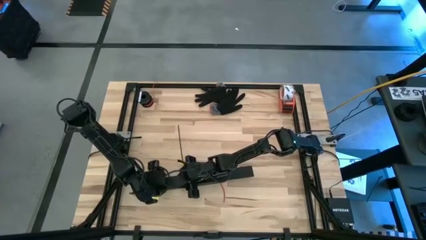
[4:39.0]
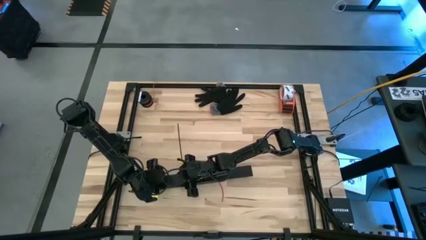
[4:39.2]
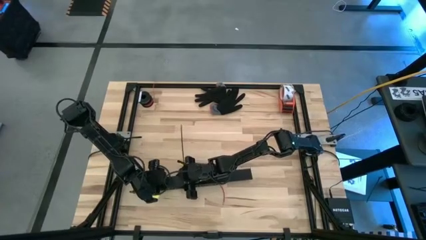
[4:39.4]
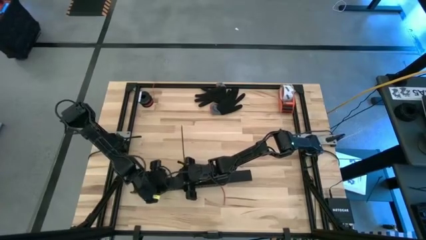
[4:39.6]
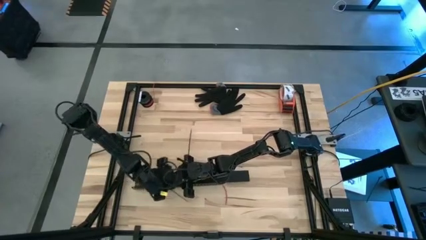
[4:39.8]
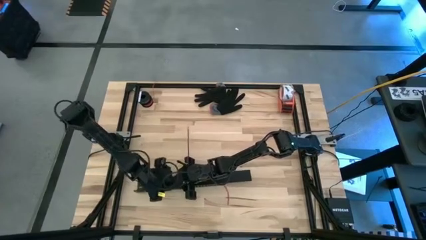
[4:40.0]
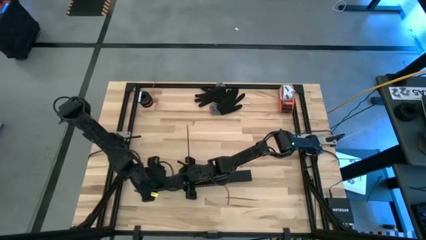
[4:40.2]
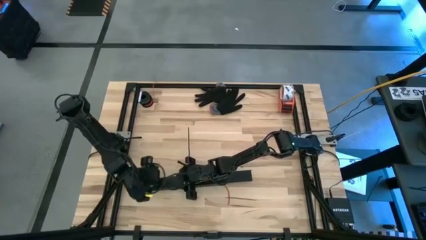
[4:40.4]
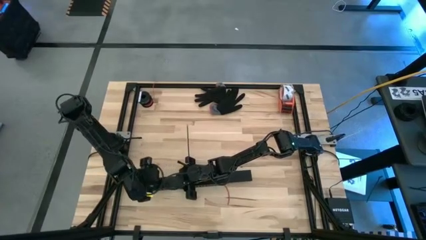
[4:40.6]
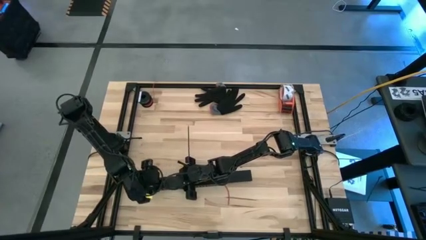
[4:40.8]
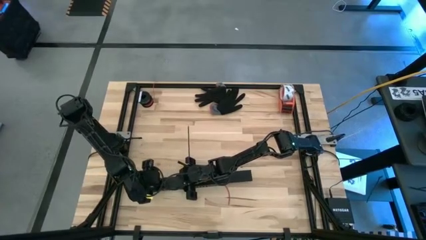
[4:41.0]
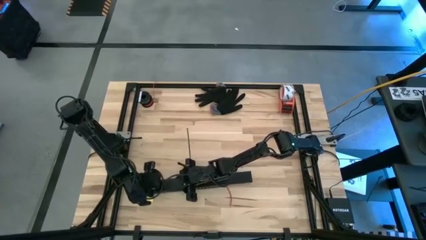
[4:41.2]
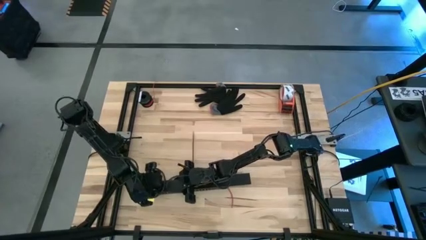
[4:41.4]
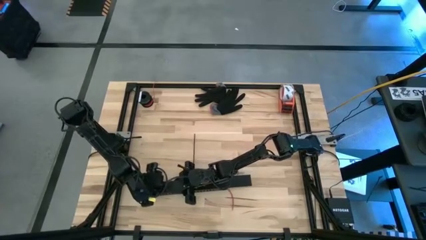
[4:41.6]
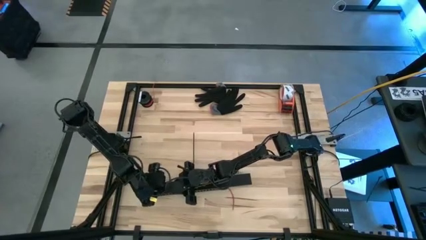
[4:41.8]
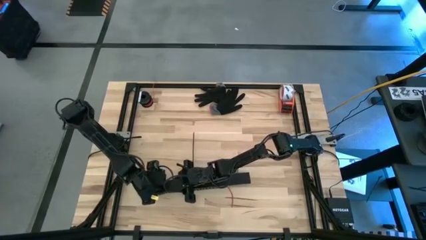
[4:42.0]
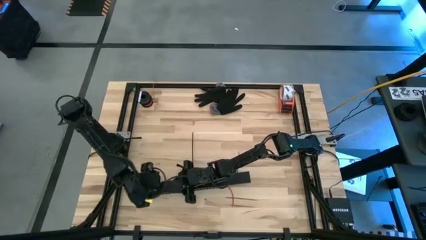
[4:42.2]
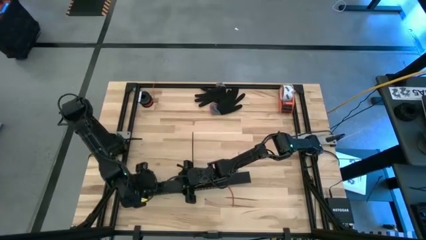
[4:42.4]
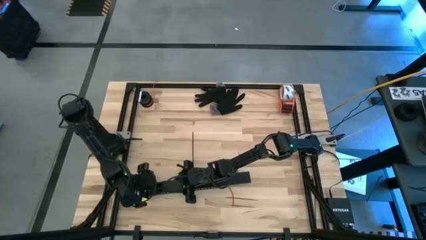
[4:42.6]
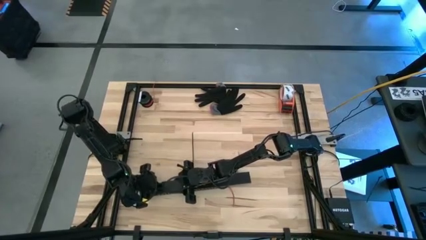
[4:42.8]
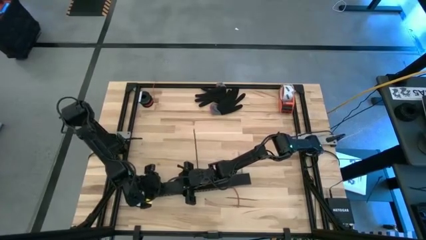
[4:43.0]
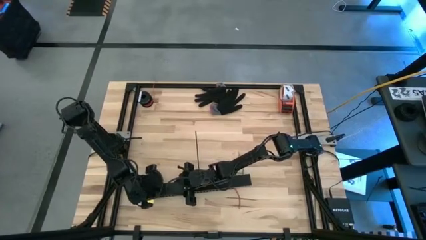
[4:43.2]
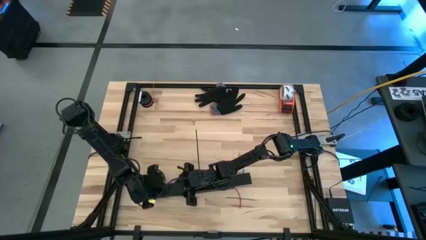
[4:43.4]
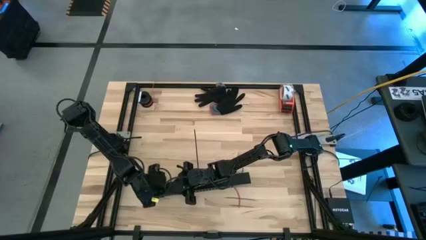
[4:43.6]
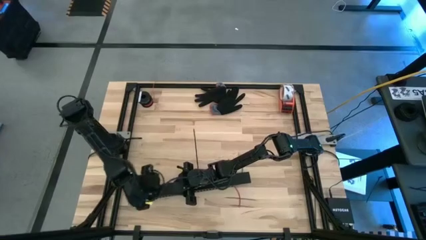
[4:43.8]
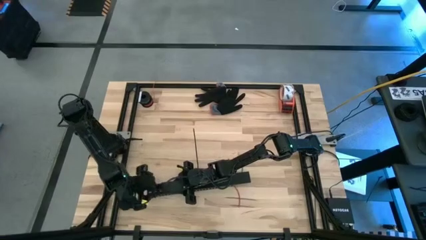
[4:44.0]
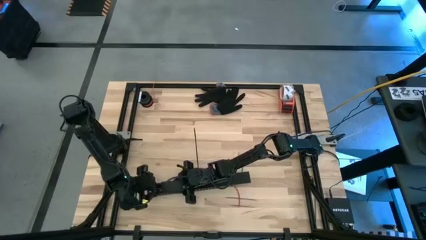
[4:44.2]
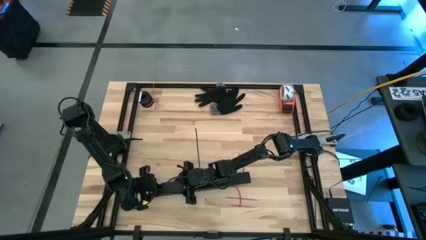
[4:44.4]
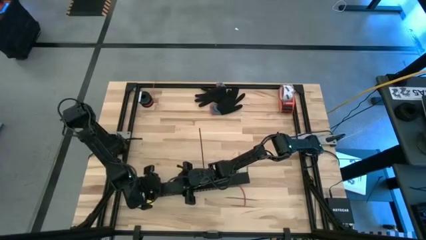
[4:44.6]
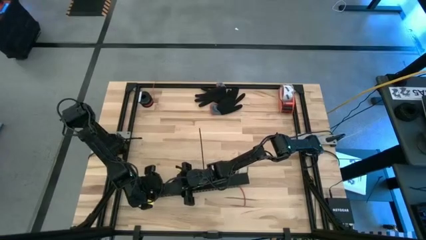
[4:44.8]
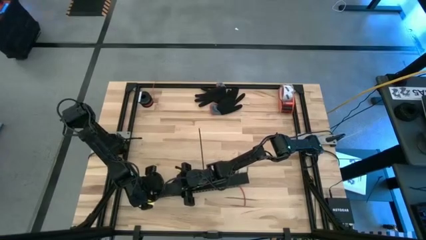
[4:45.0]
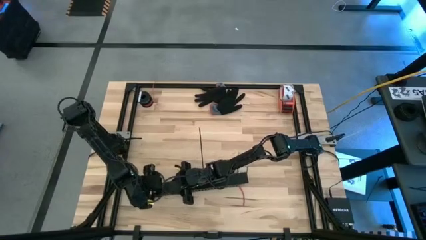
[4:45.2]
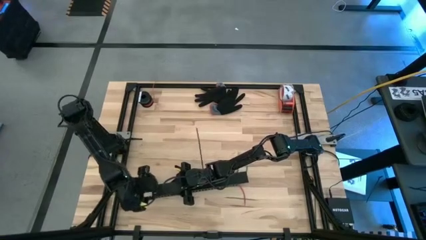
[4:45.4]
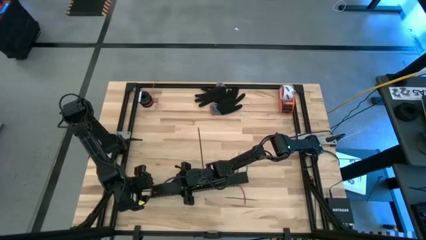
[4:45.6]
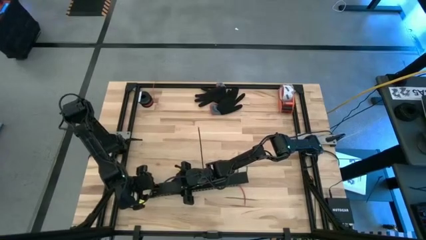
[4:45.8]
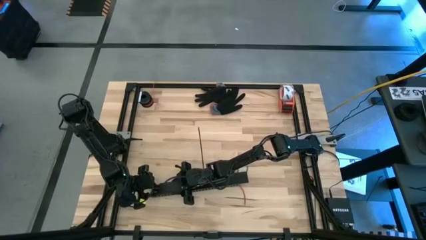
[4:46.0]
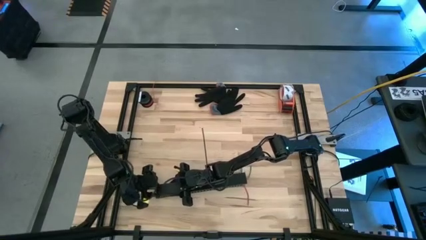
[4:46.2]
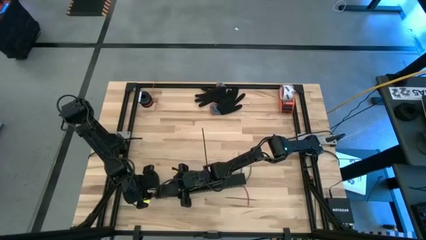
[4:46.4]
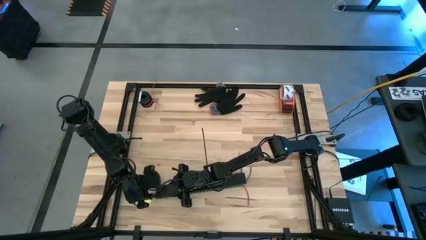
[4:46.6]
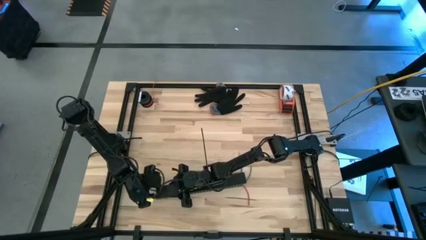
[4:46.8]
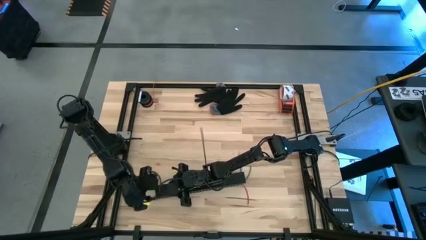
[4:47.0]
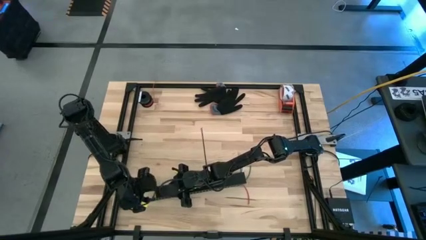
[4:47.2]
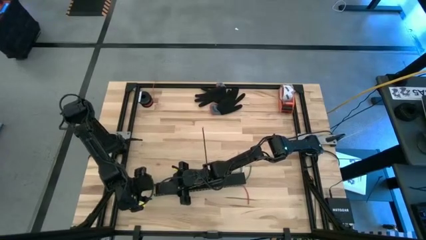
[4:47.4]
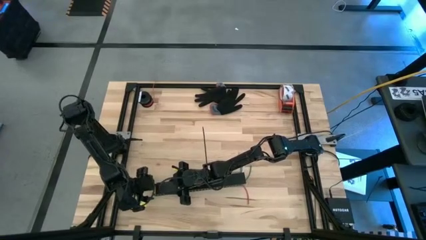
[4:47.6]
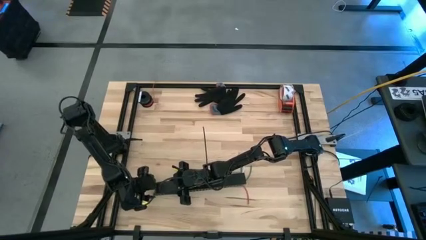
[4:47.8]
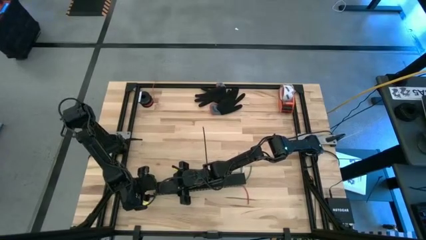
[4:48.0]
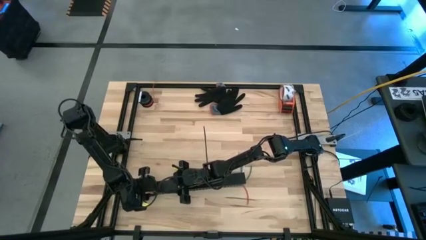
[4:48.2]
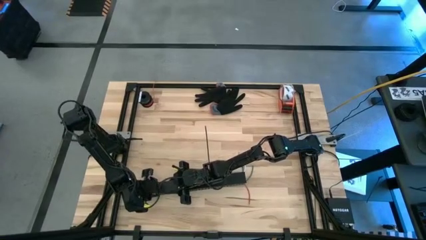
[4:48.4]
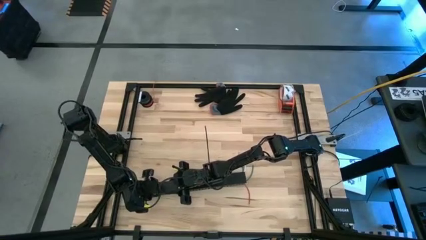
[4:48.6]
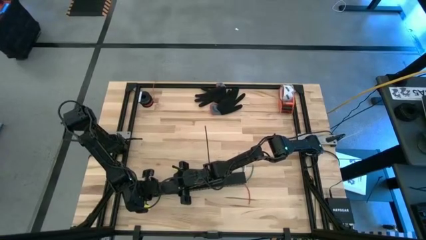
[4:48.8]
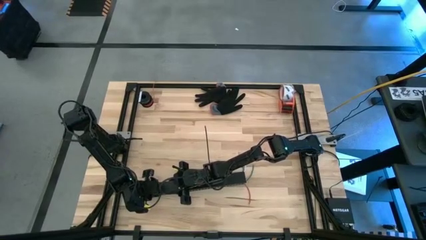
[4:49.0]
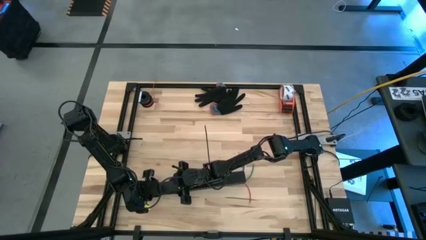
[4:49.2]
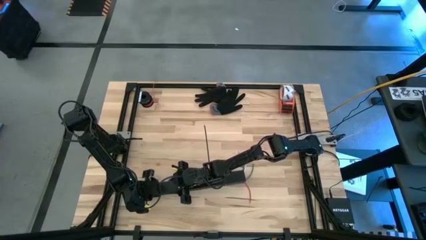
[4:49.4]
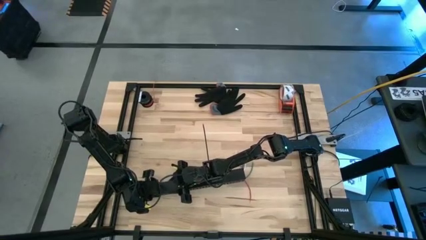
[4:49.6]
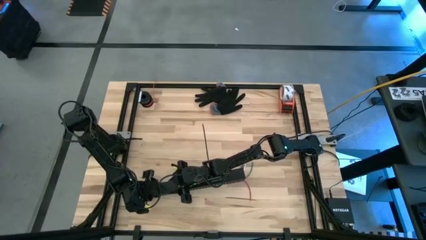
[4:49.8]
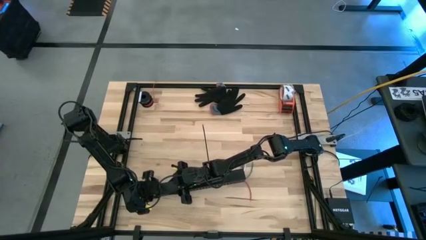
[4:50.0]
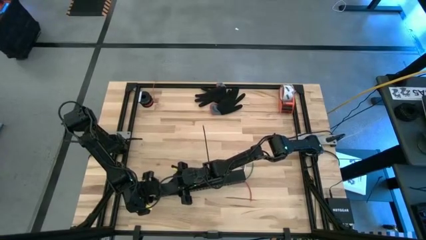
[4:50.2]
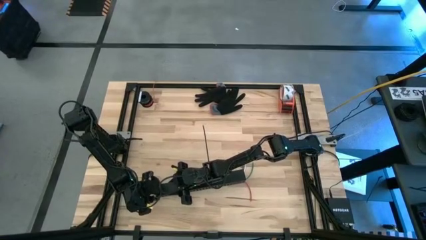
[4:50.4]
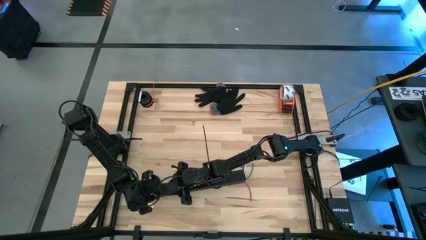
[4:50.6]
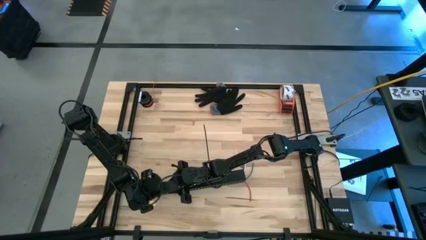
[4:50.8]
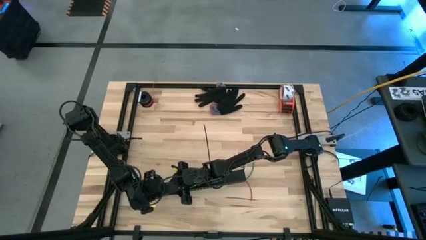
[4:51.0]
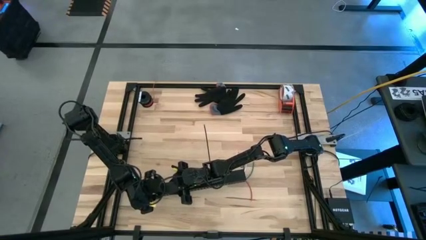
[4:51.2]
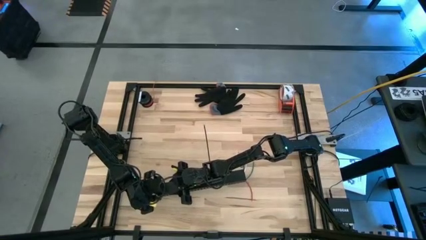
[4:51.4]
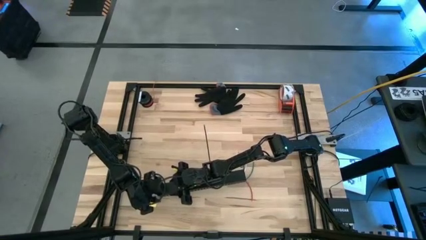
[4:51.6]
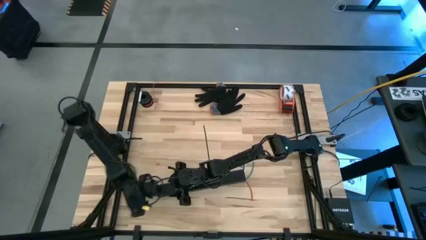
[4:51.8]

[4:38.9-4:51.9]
Task: Ziptie cables
Close the black cable duct lid
